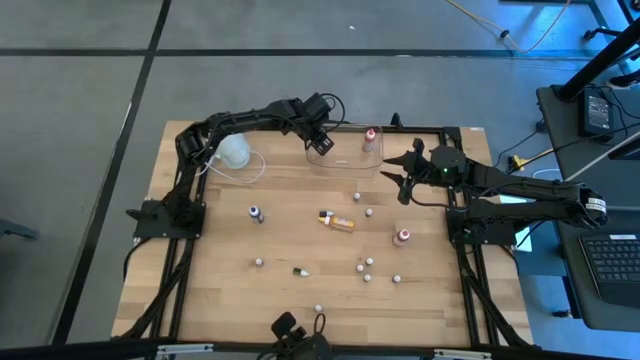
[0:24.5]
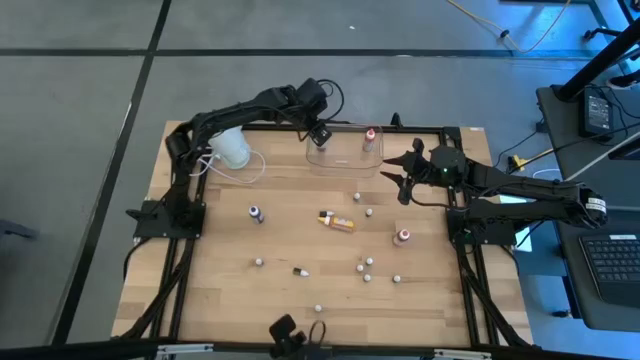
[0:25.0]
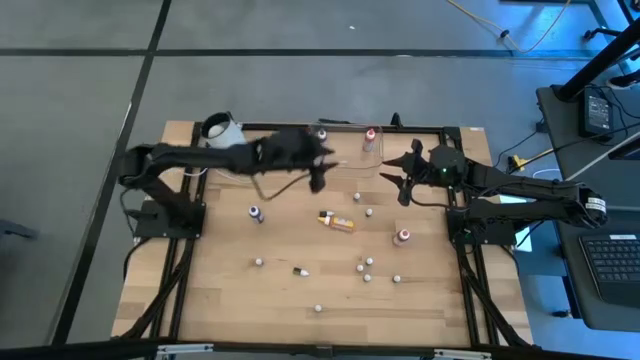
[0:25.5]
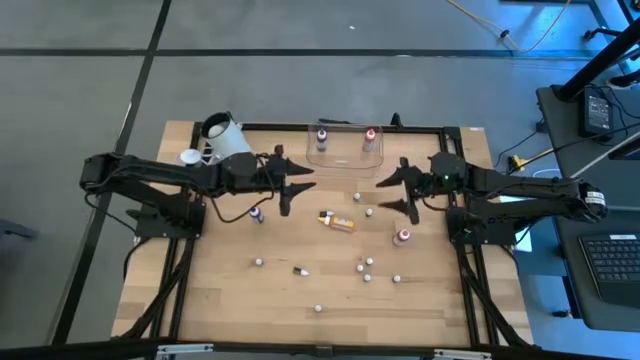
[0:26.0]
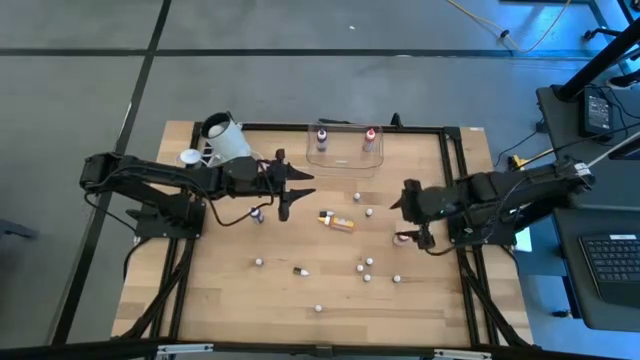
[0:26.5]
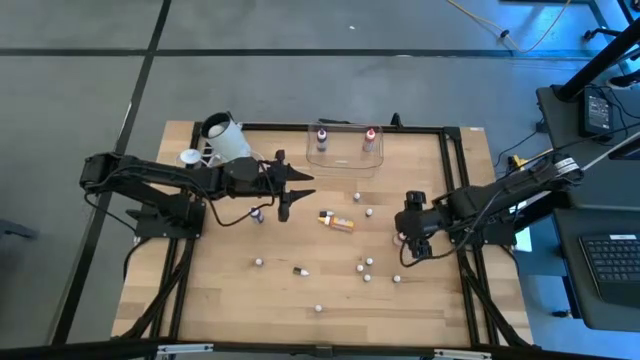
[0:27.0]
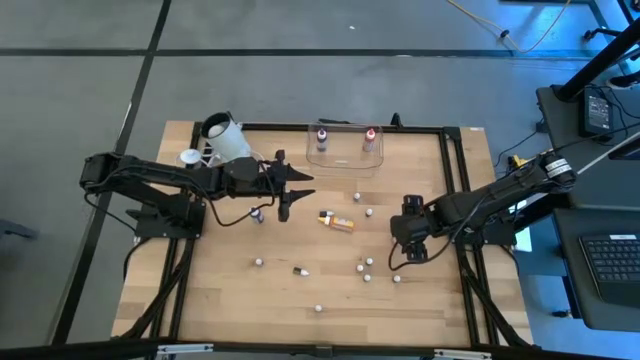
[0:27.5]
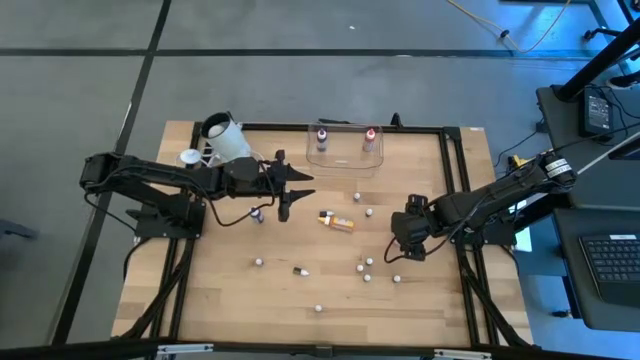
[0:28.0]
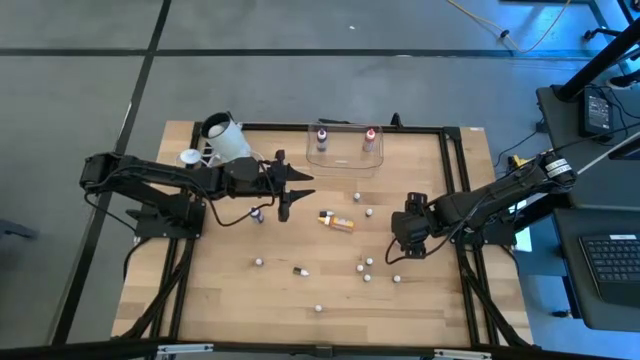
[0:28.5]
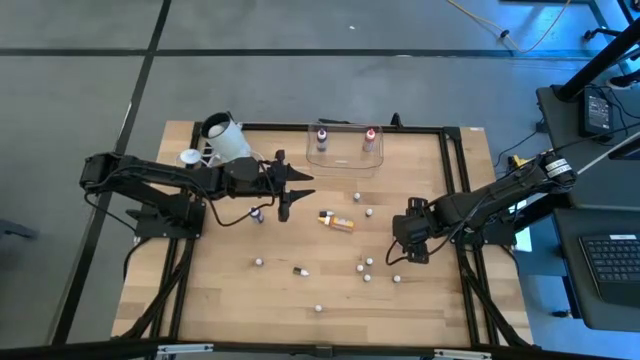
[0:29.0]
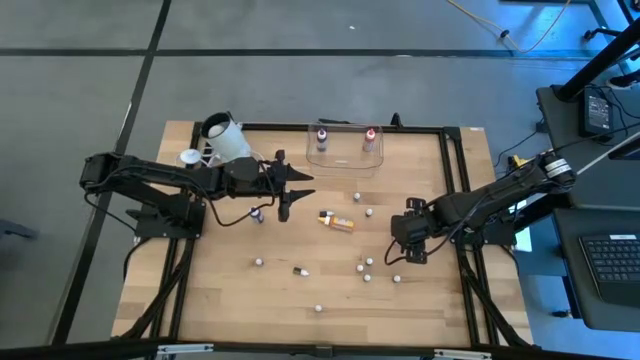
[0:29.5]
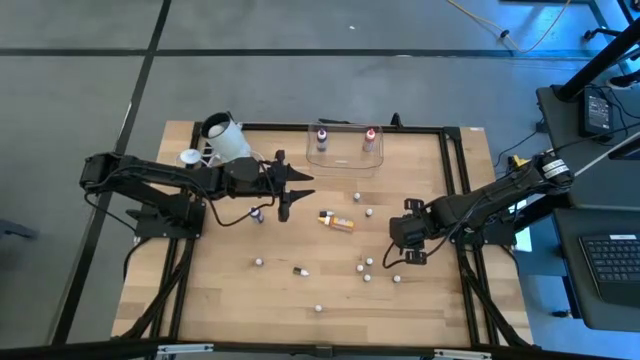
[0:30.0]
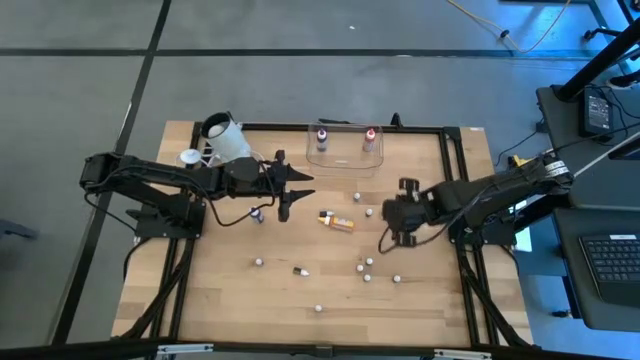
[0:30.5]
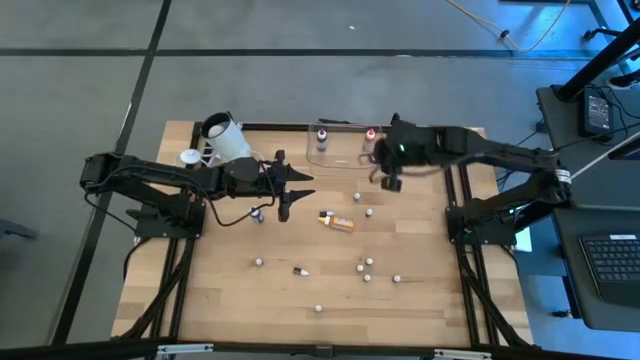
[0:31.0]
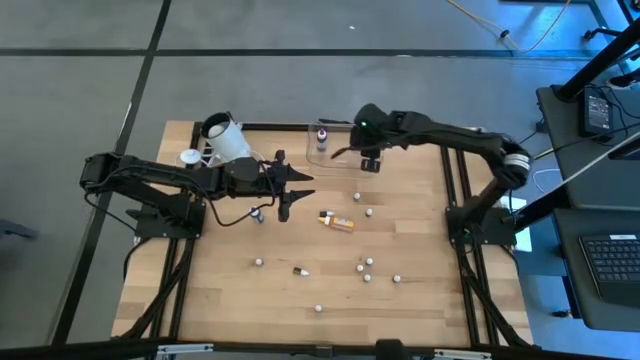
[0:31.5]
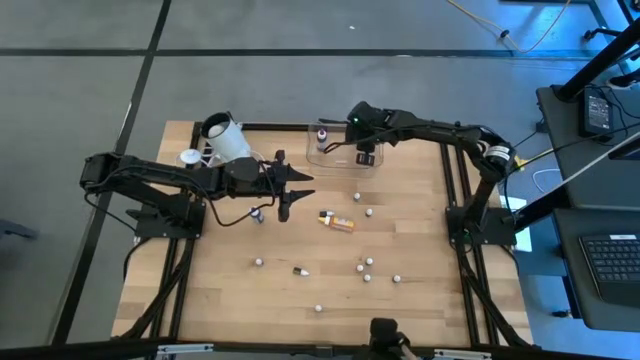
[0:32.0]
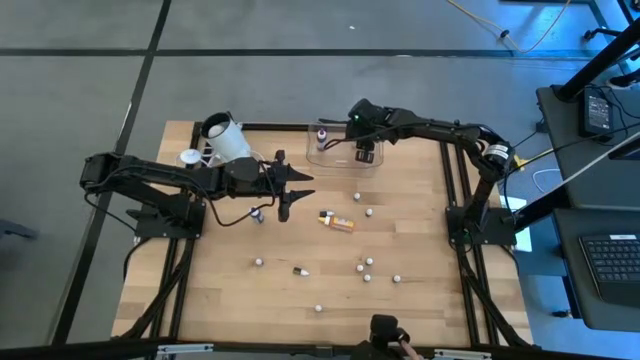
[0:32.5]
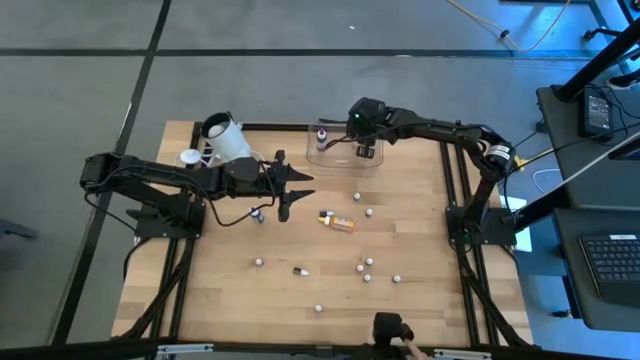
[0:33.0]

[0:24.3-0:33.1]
Task: Pick & Place food coloring
Put the large pink food coloring bottle into the transparent container

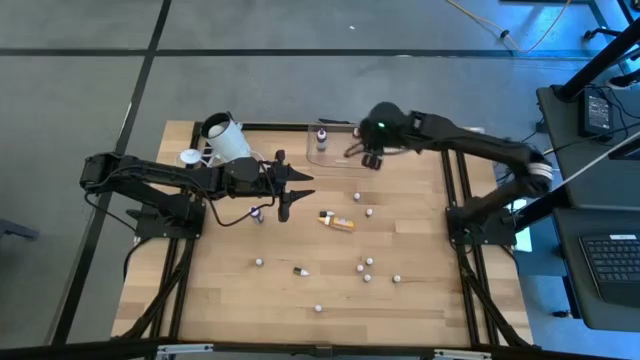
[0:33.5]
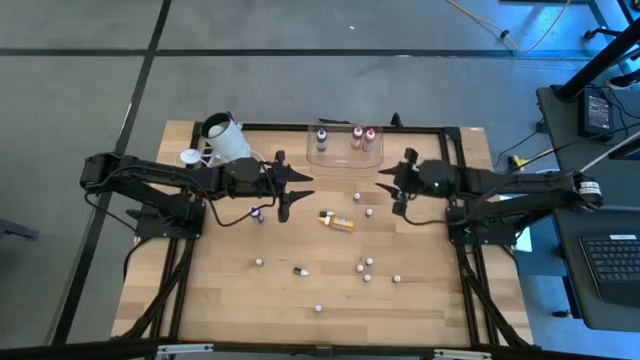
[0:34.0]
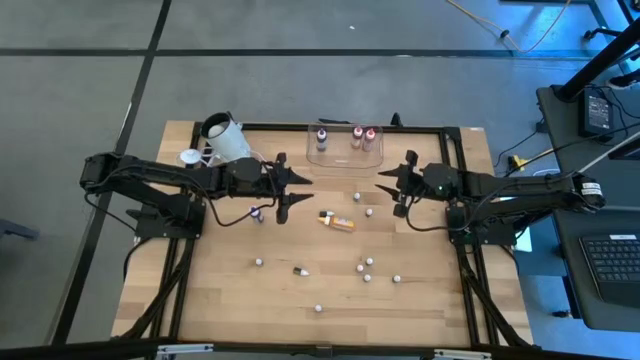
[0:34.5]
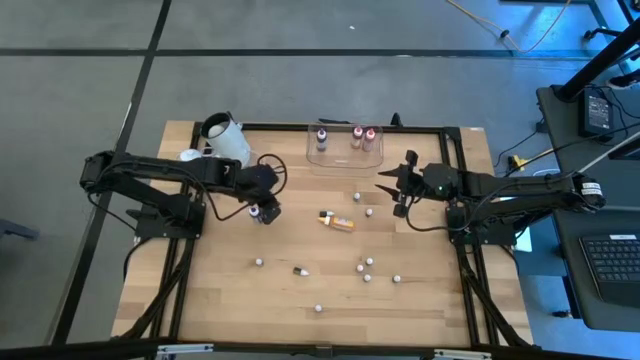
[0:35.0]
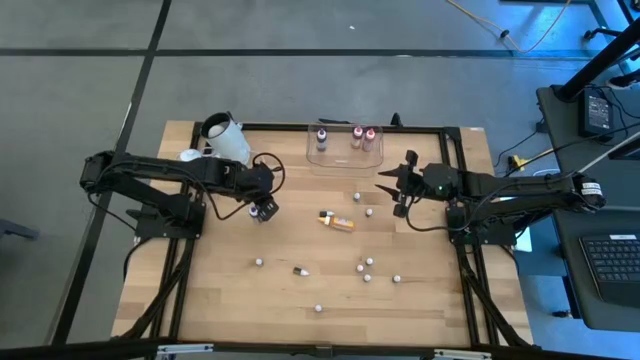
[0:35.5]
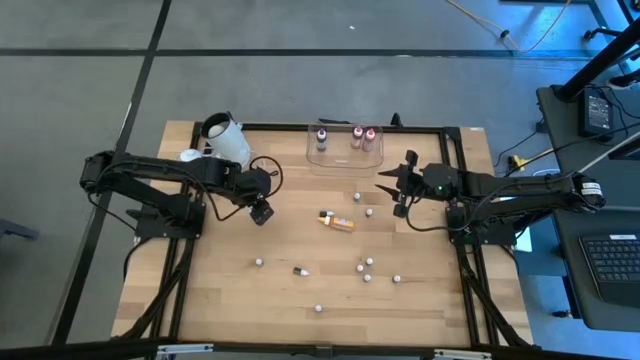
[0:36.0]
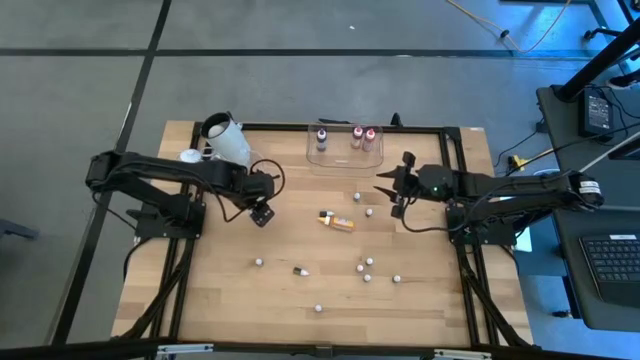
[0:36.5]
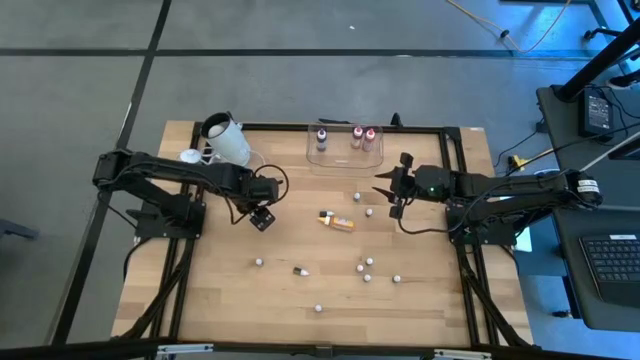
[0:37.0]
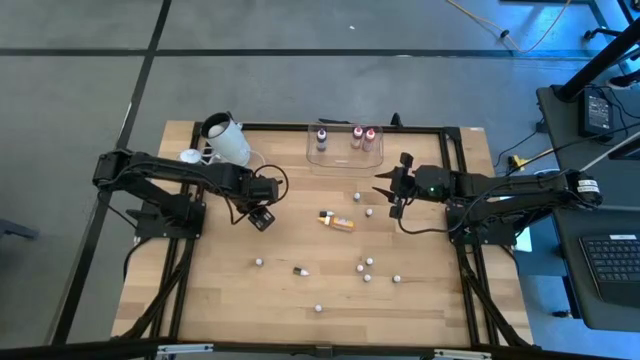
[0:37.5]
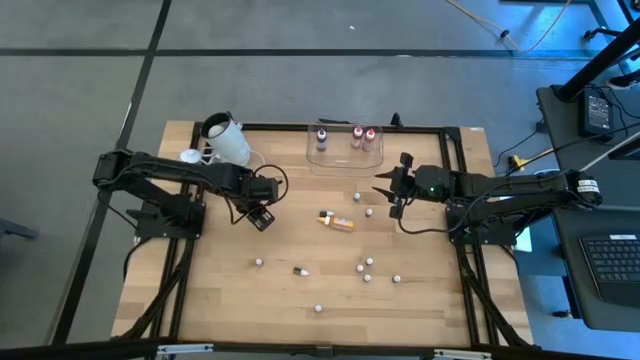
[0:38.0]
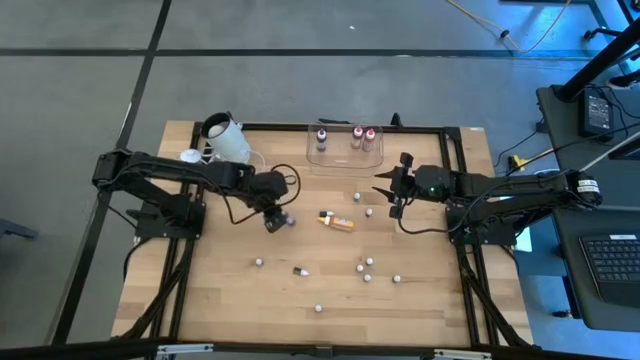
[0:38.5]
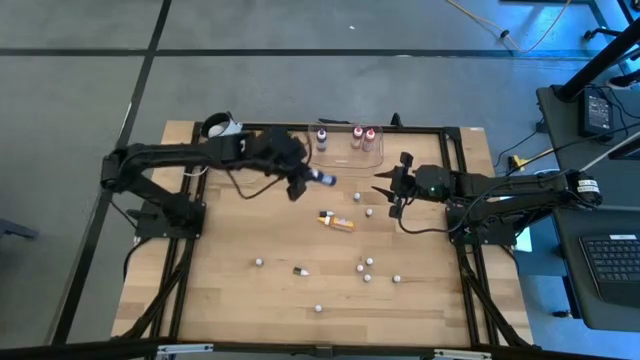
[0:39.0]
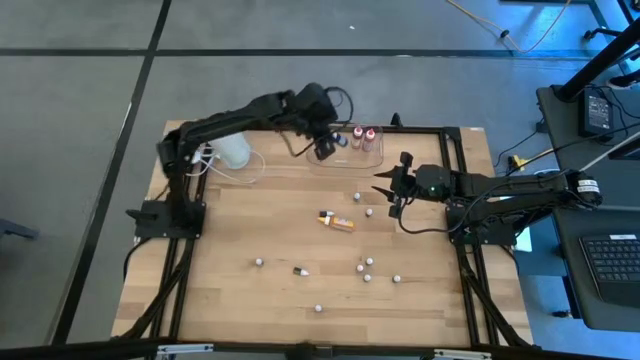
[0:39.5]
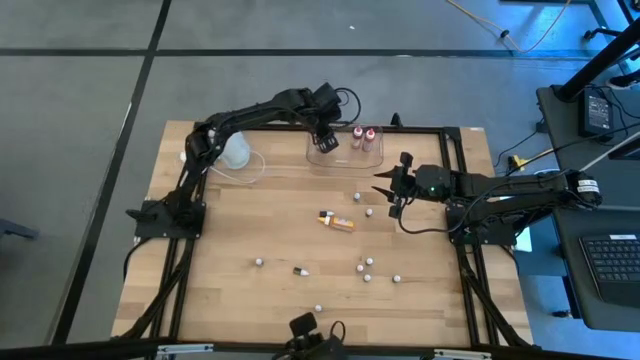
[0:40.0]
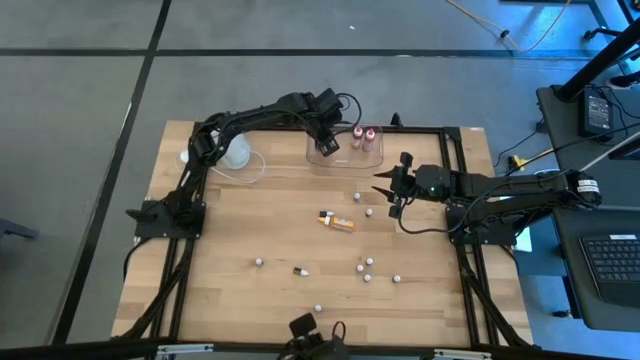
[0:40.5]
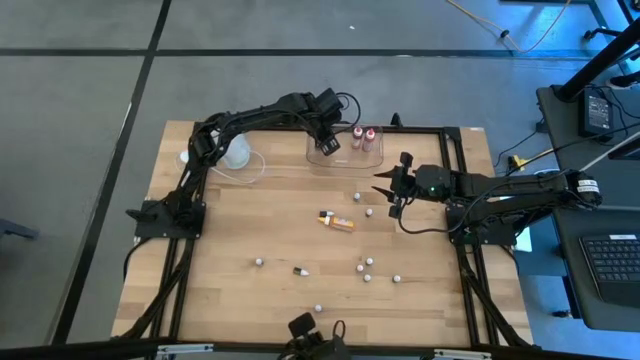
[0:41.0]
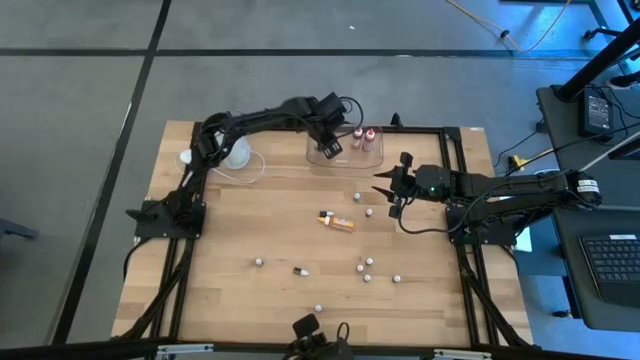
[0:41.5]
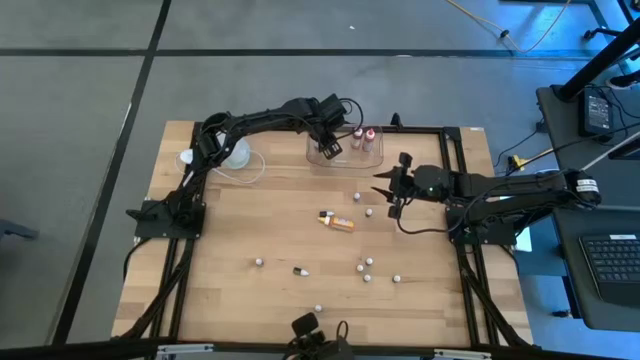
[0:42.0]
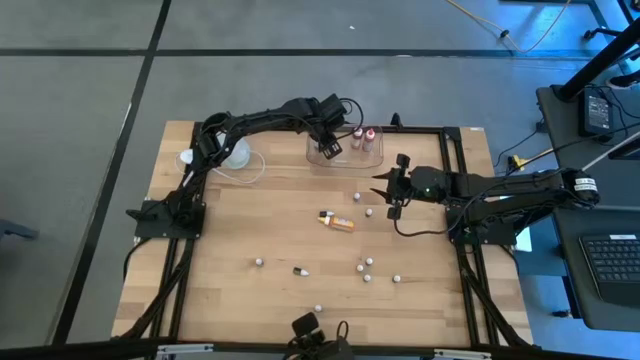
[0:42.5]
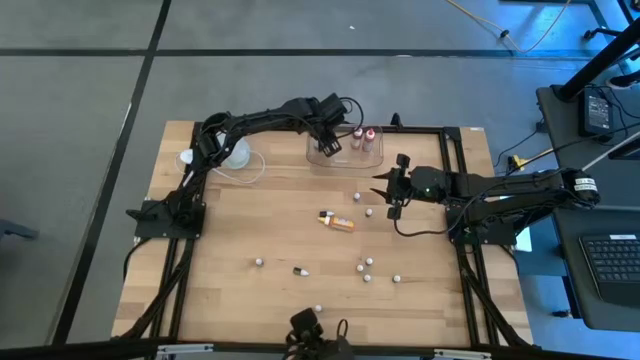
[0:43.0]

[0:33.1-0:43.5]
Put the large blue food coloring bottle into the transparent container

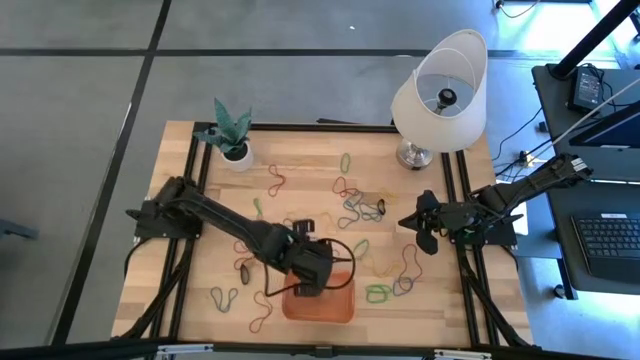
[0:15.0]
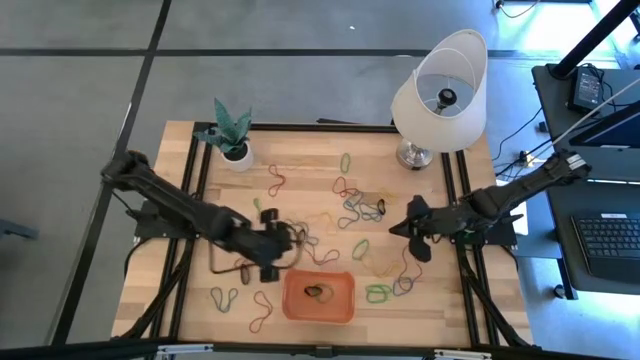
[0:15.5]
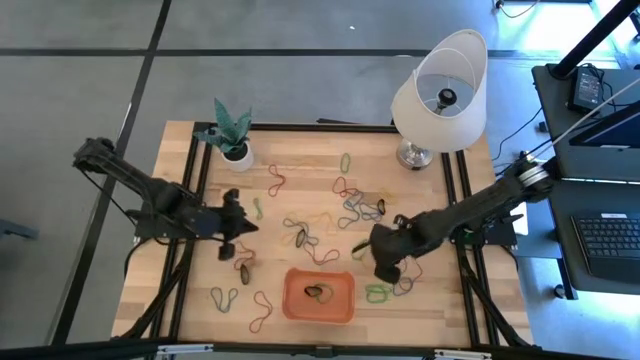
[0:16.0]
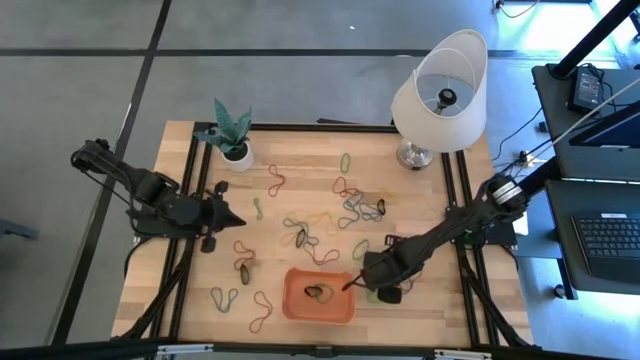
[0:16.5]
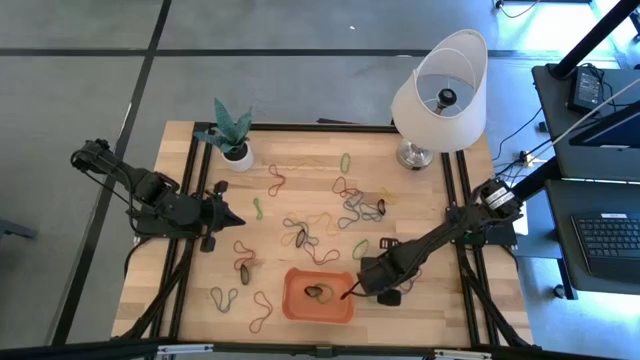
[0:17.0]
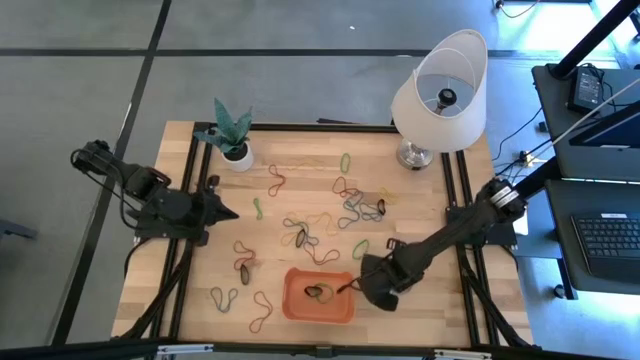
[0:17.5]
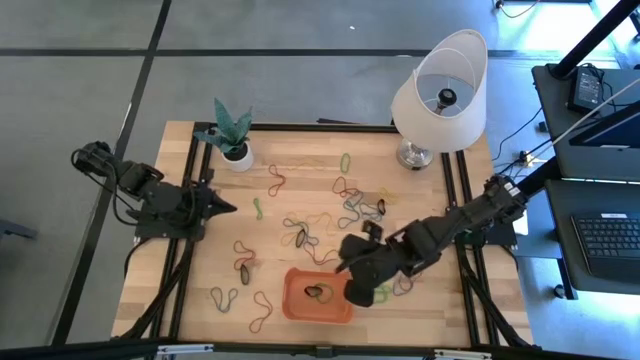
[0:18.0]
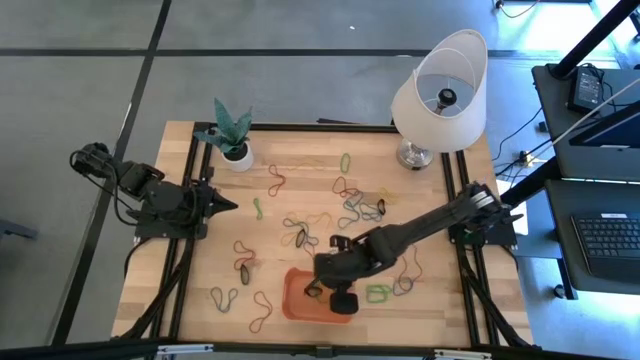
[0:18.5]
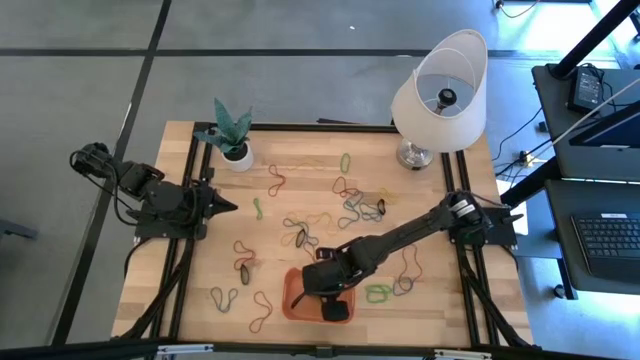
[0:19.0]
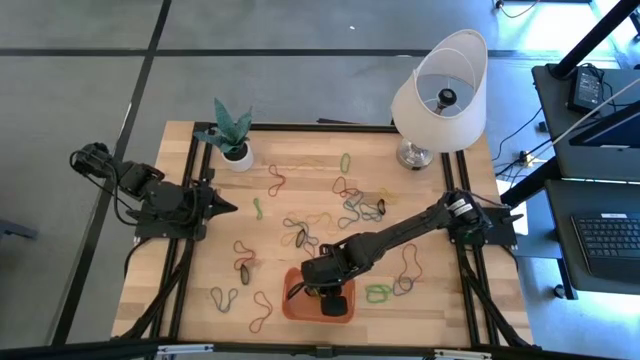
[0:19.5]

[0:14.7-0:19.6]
Task: Pick and place rubber bands into bin
Put the yellow rubber band into the bin
